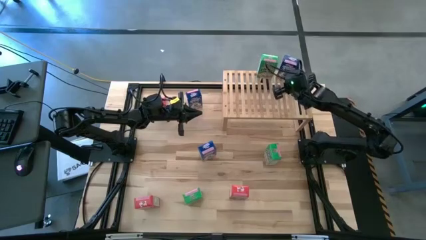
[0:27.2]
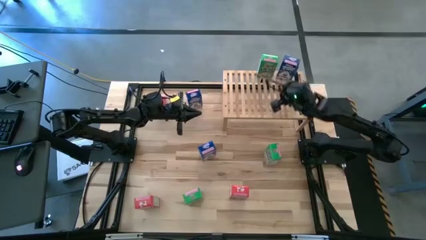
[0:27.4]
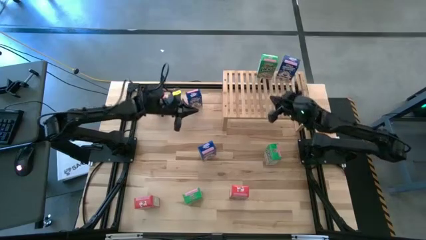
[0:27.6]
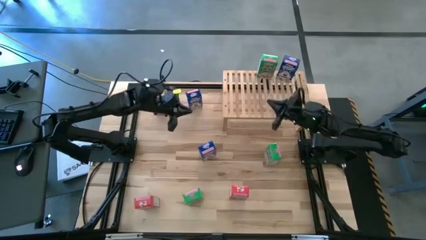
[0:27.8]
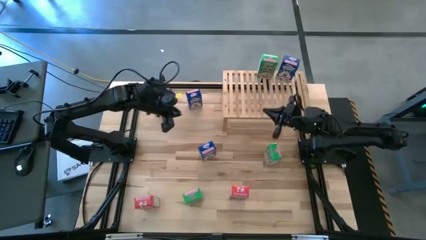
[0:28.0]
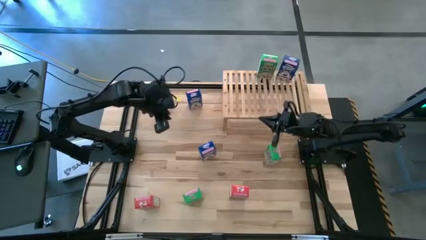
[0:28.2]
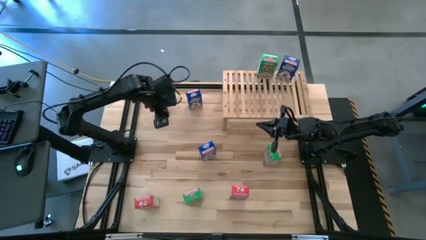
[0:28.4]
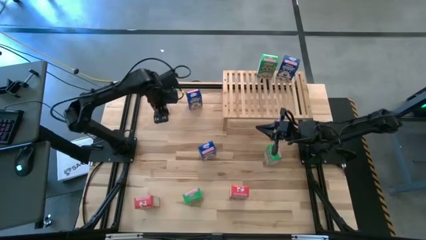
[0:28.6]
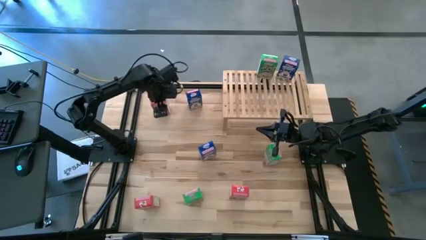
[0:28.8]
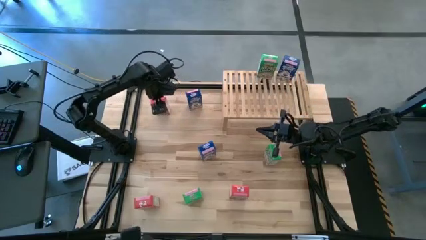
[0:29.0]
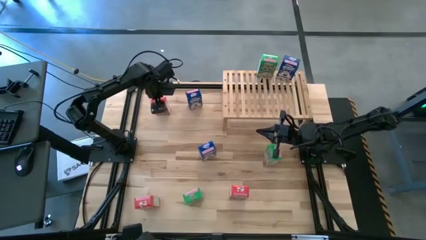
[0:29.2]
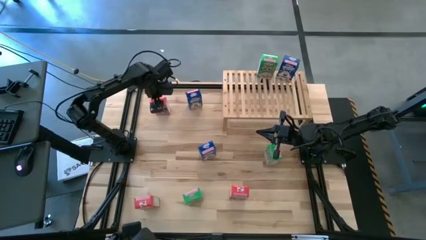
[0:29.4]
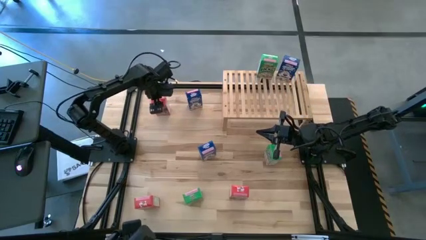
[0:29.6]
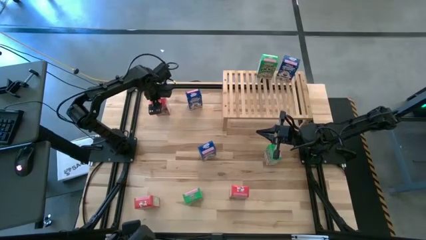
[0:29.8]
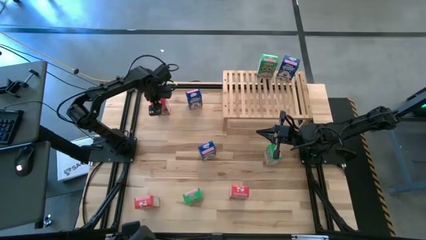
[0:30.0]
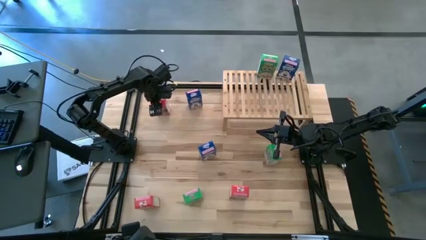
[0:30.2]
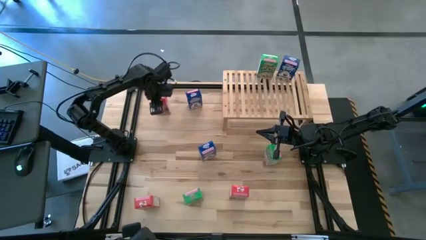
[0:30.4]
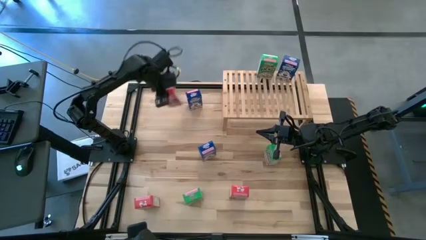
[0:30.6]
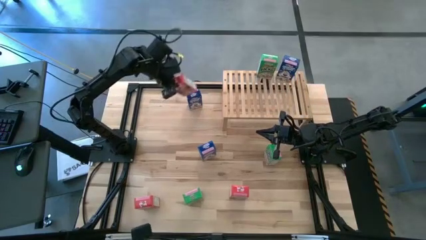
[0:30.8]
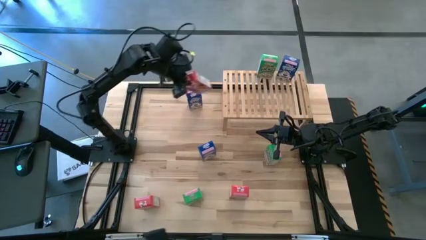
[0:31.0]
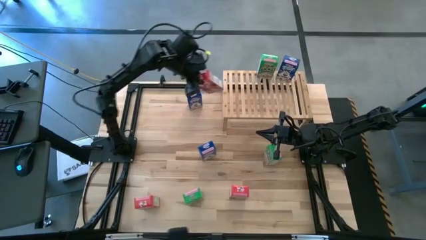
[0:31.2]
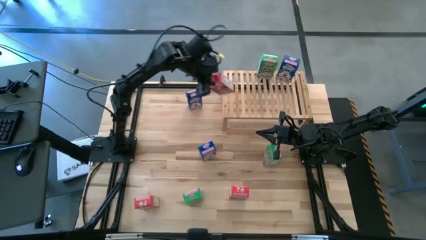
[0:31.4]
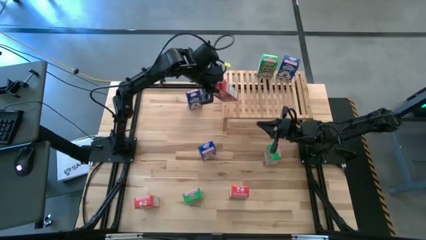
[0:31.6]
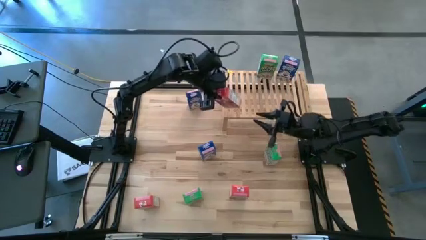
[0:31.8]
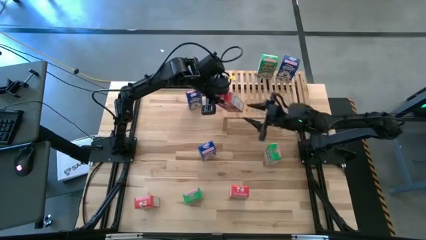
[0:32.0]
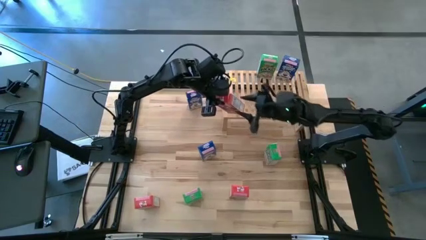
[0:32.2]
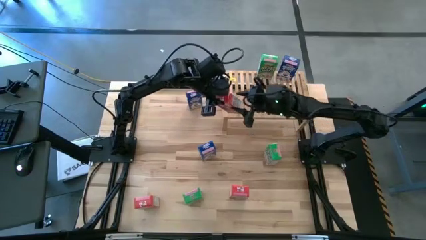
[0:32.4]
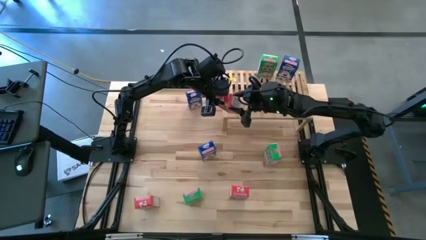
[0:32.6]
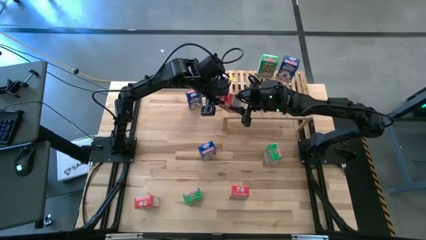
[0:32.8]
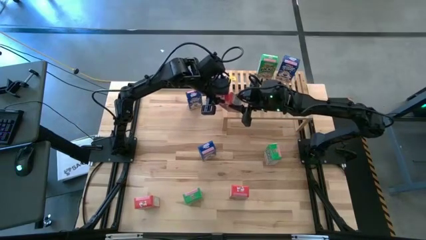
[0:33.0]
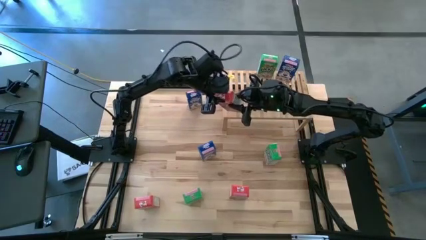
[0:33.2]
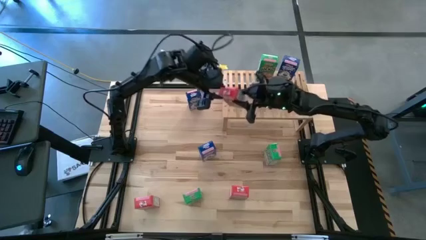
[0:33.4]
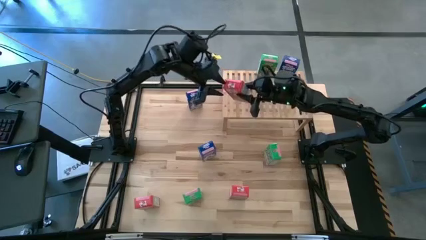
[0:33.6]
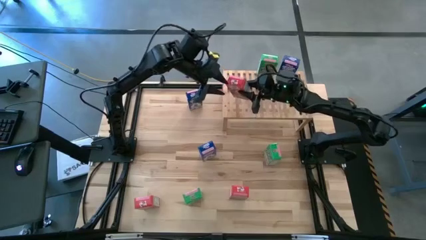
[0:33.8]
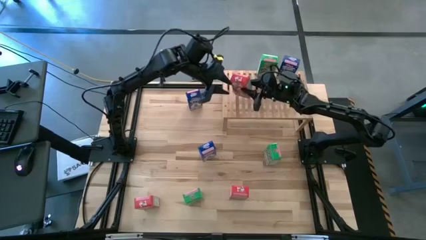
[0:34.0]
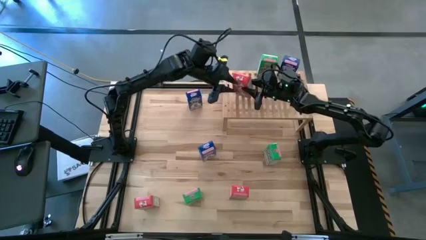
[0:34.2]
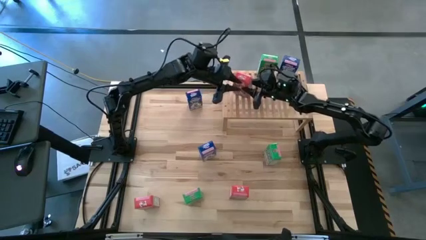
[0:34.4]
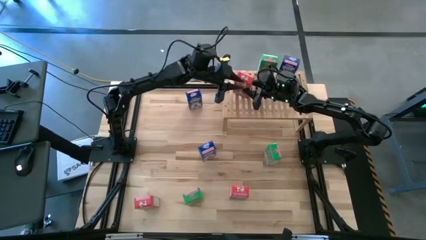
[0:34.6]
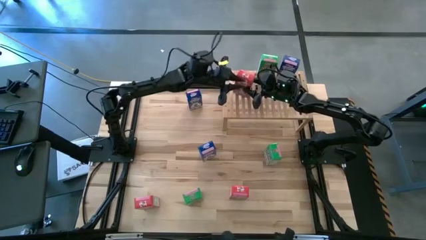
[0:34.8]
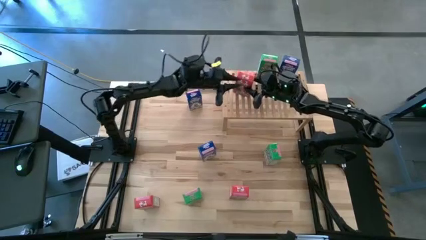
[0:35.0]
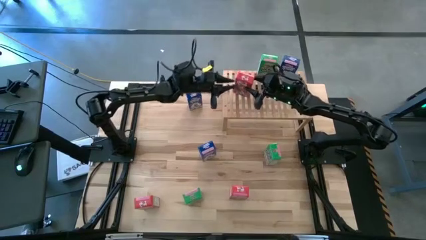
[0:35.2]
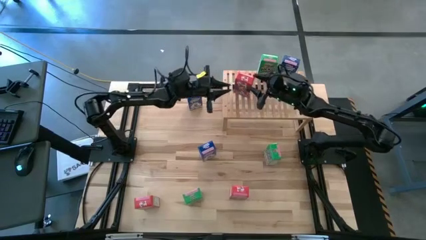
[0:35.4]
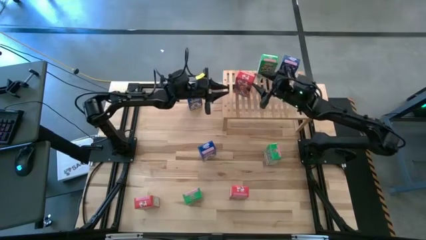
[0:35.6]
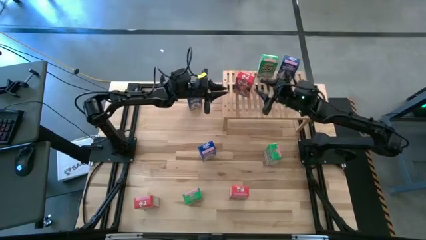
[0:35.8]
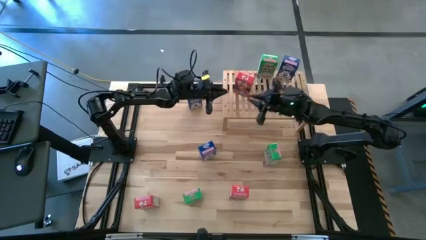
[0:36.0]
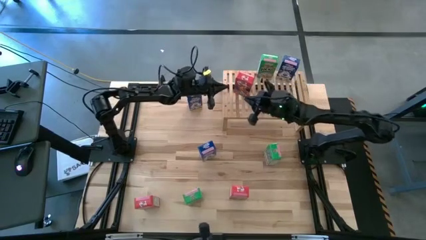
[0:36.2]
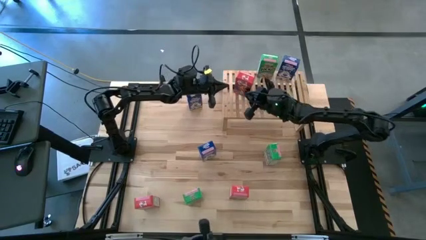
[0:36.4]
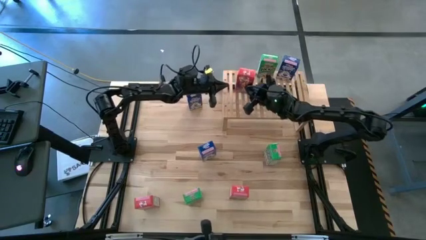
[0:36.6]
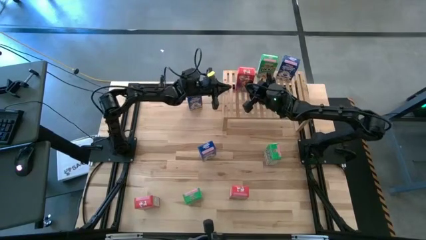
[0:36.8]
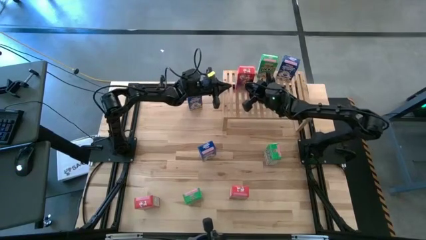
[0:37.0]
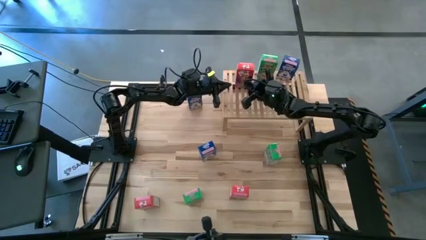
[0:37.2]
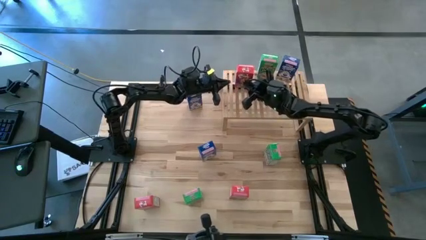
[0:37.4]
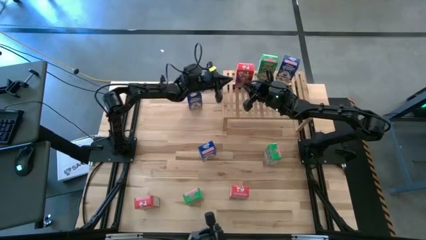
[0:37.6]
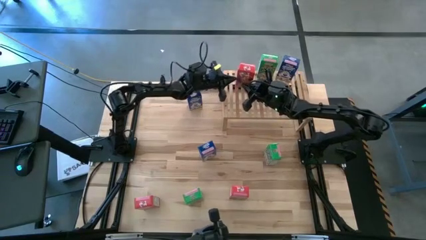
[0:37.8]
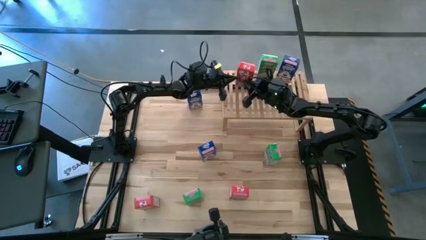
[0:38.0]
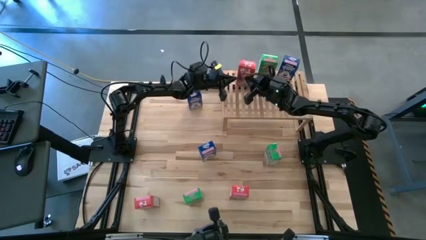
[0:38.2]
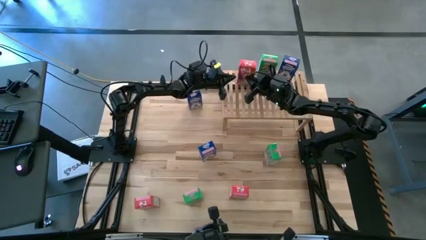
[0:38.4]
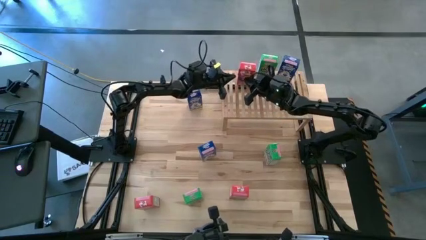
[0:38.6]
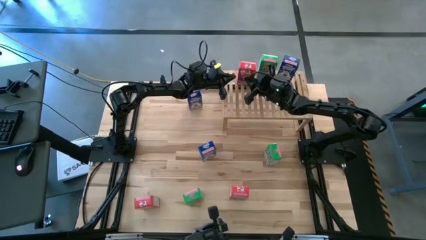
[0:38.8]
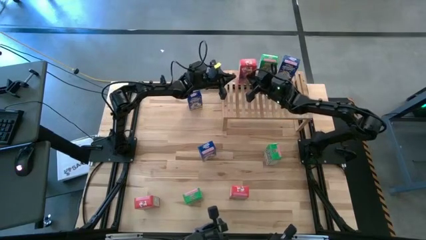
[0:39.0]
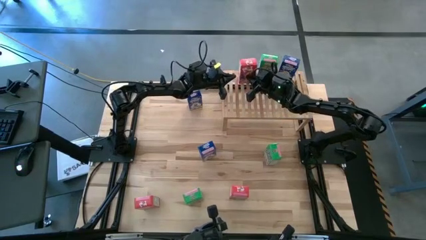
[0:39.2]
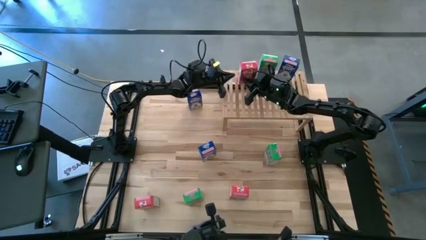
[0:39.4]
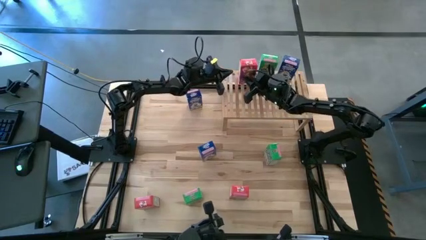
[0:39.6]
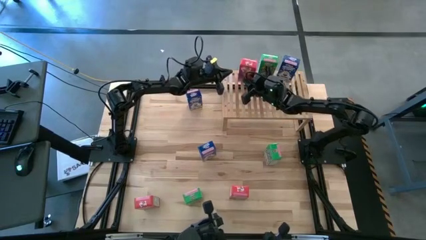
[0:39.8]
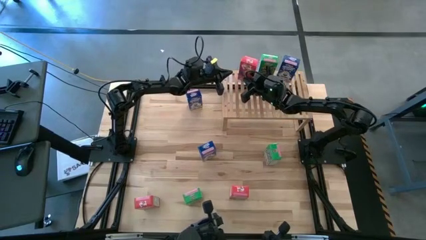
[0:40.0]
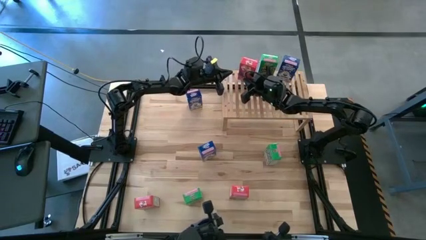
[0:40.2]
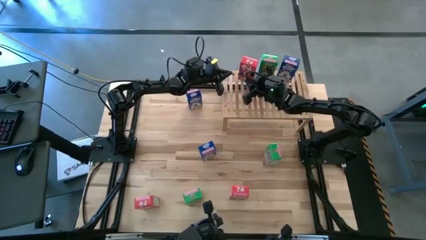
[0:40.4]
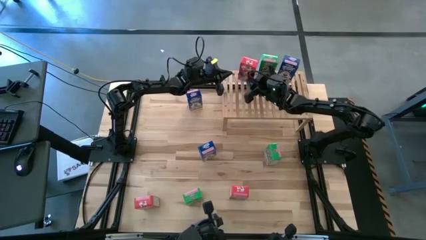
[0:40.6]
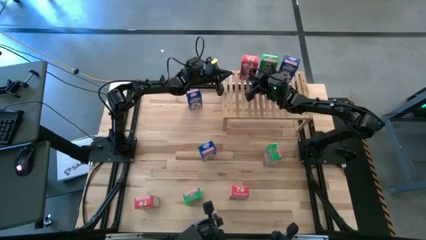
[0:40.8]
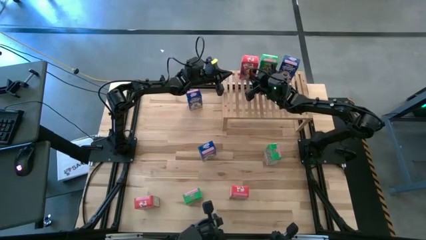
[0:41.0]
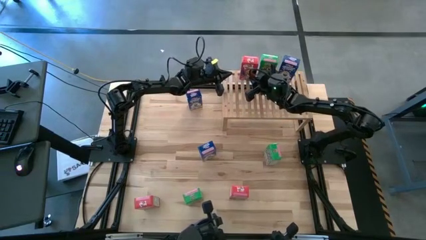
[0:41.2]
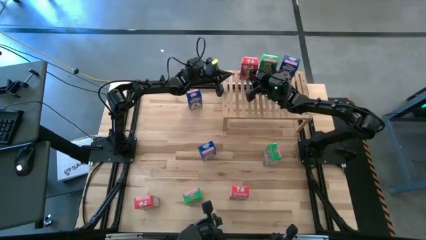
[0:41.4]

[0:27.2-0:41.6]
Task: Stack cereal on shelf
Put the top left red cereal box on the shelf

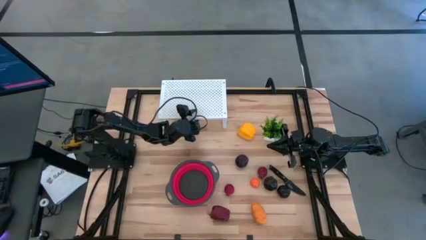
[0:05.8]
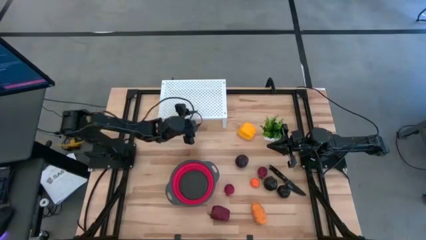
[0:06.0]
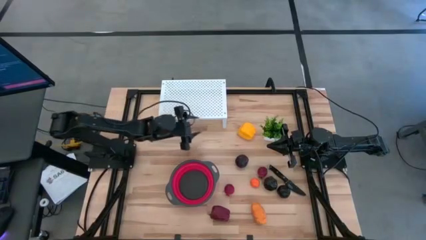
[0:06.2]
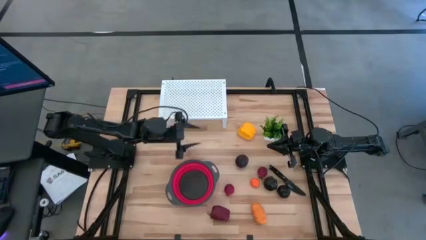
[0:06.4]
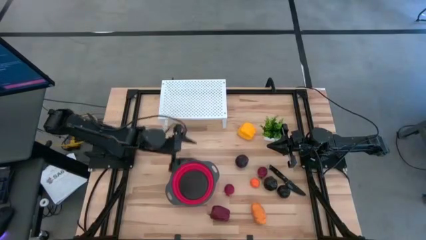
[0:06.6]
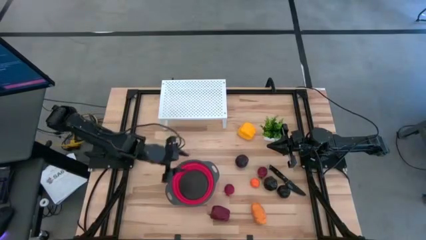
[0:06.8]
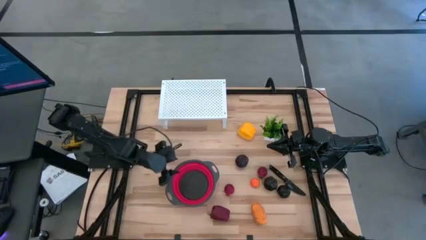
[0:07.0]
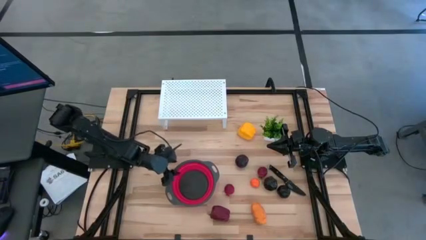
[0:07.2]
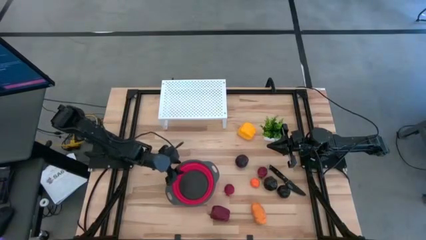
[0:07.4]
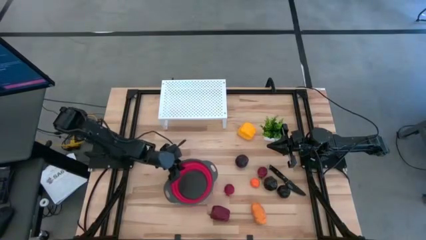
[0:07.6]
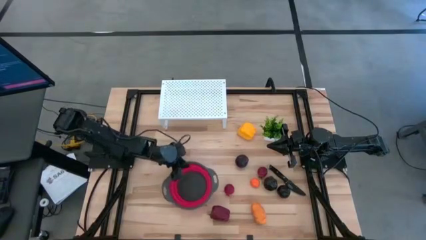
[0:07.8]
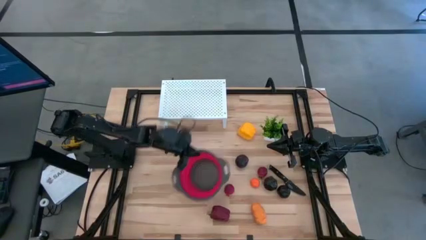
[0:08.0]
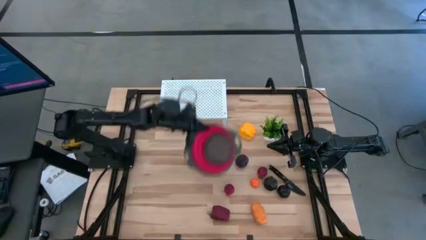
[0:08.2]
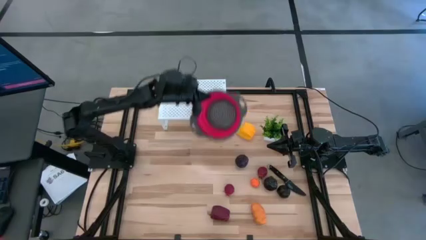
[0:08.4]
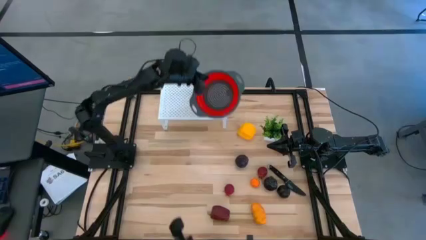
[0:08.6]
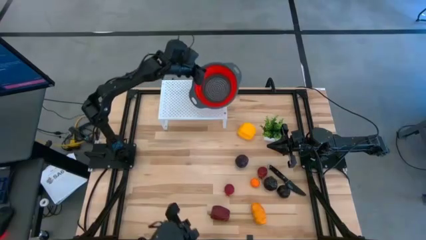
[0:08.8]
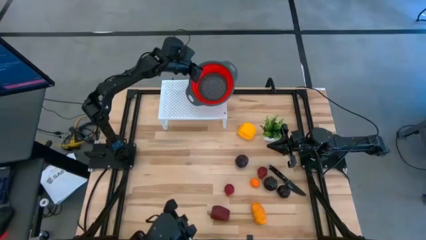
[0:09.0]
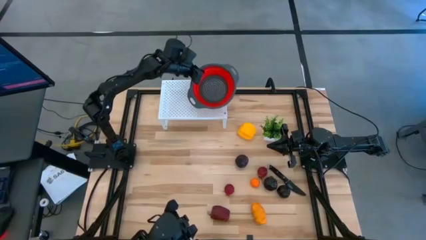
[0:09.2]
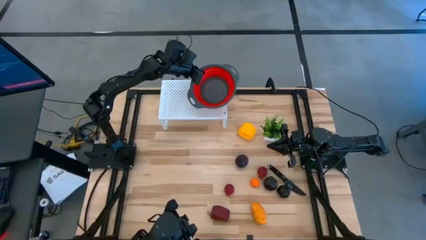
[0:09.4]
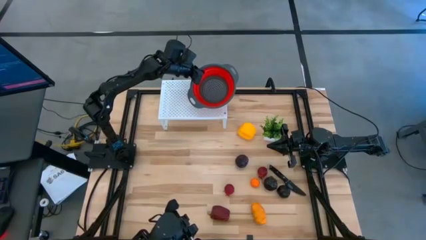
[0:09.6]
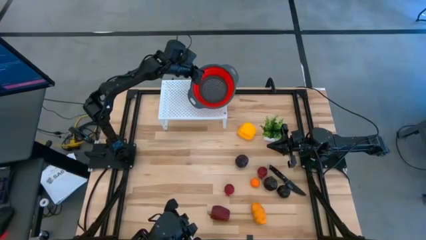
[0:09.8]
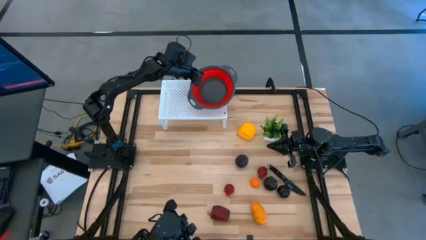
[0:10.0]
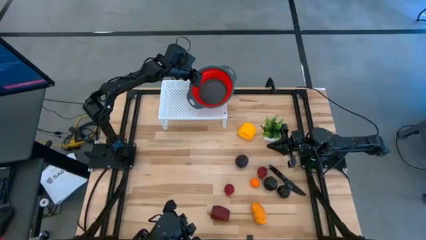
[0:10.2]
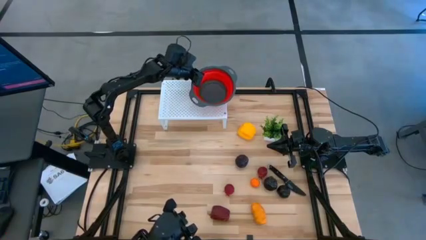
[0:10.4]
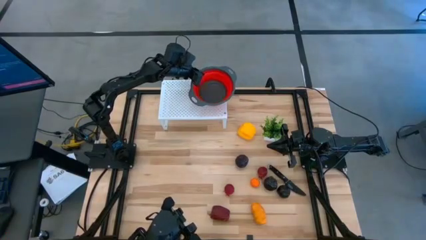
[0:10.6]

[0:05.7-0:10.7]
Task: Pick & Place Fruit
Put the red strainer bowl on the shelf
